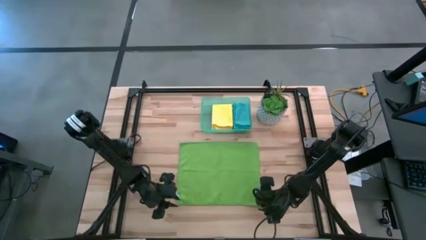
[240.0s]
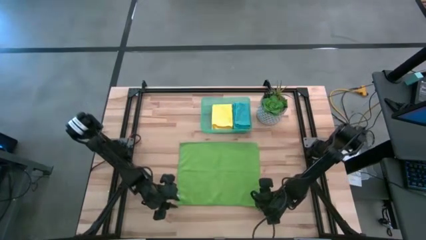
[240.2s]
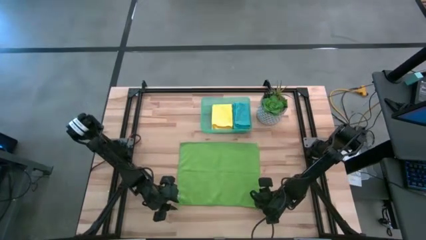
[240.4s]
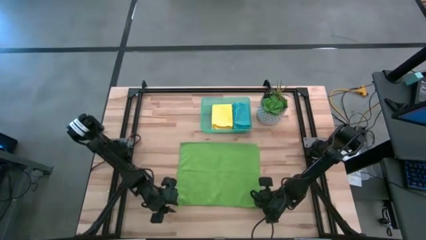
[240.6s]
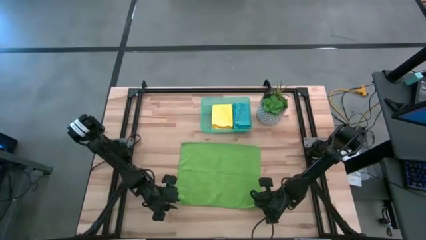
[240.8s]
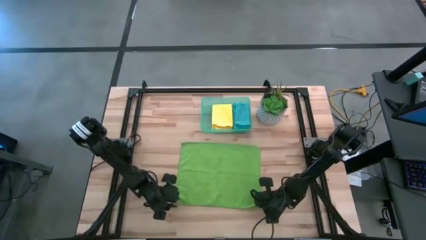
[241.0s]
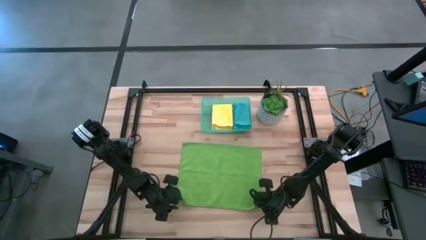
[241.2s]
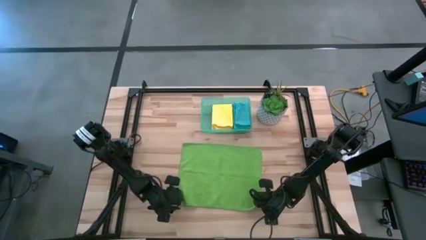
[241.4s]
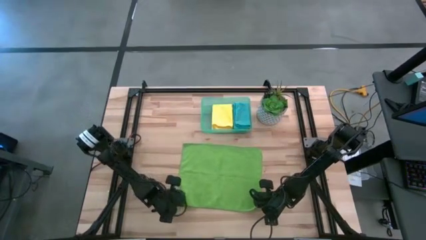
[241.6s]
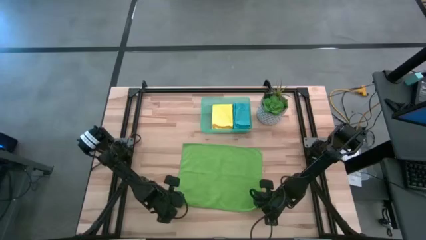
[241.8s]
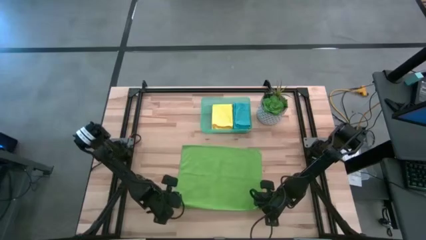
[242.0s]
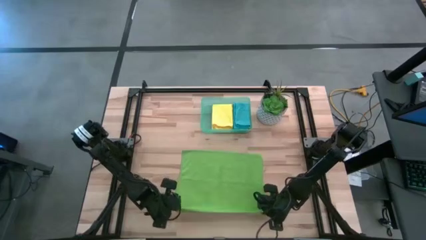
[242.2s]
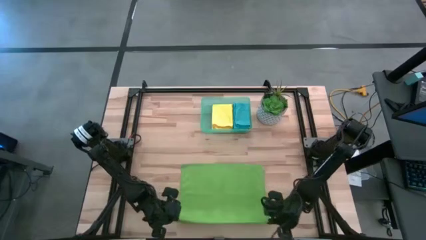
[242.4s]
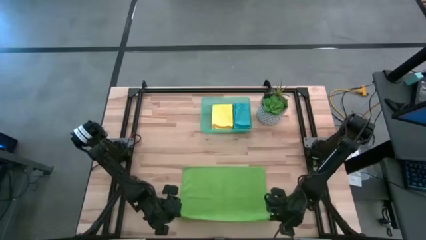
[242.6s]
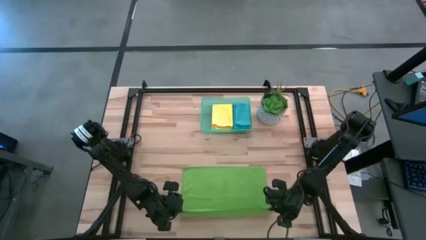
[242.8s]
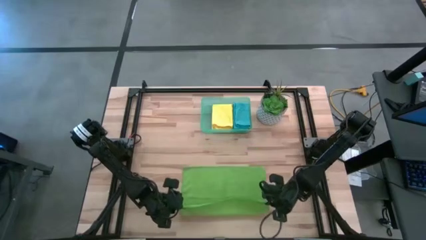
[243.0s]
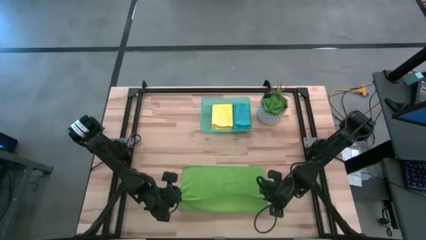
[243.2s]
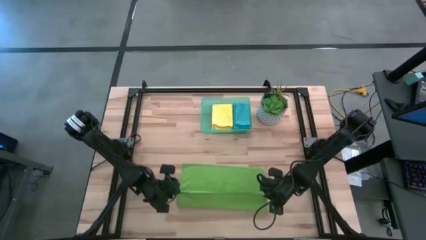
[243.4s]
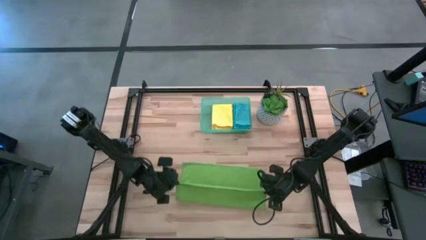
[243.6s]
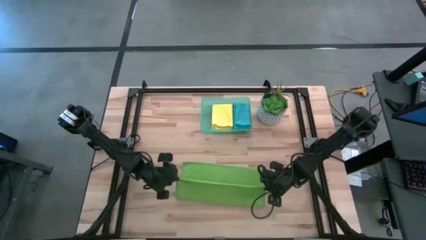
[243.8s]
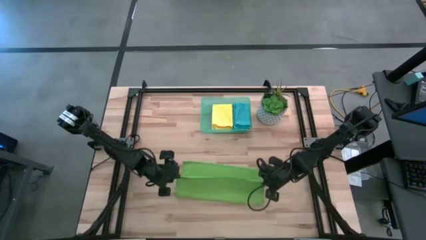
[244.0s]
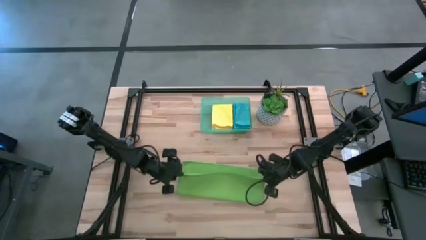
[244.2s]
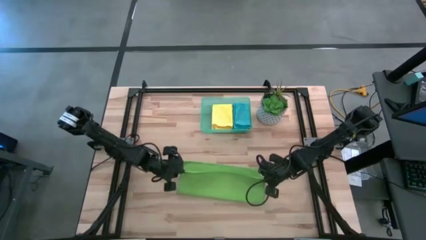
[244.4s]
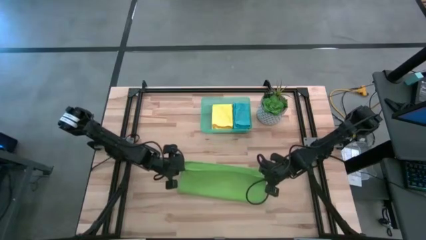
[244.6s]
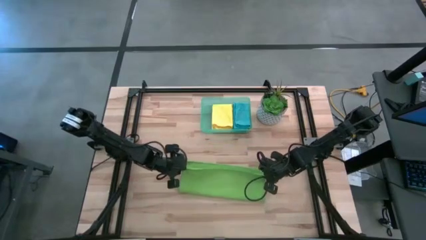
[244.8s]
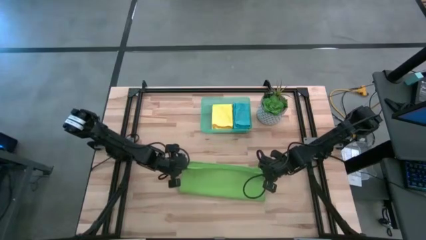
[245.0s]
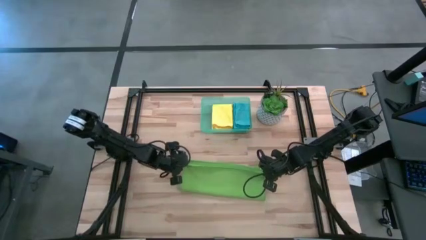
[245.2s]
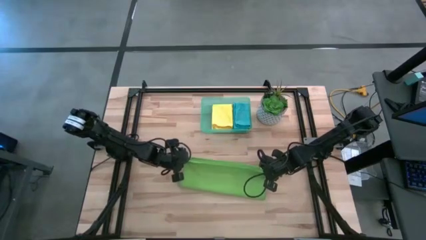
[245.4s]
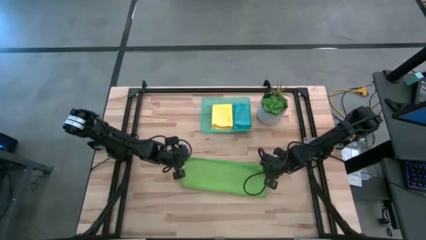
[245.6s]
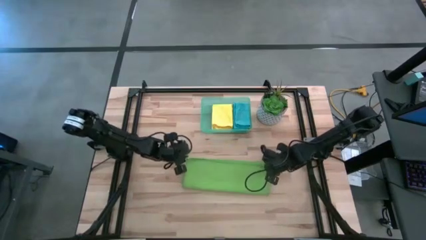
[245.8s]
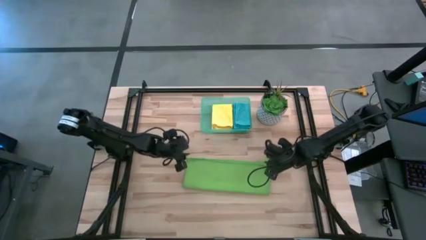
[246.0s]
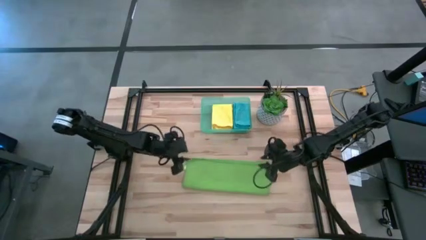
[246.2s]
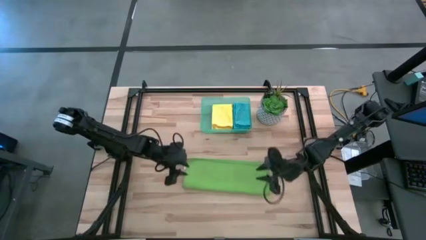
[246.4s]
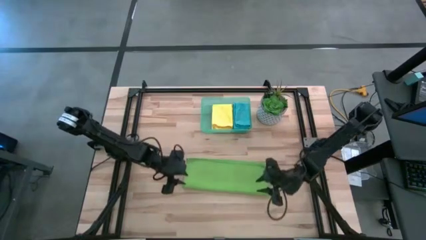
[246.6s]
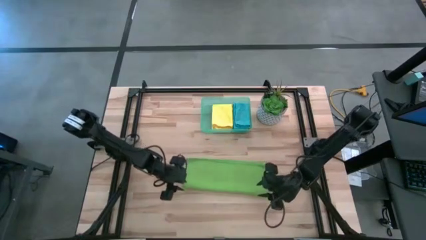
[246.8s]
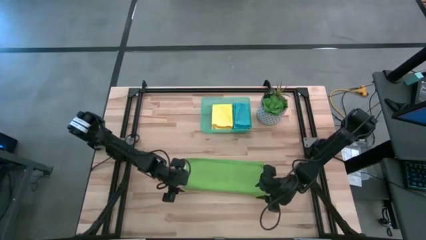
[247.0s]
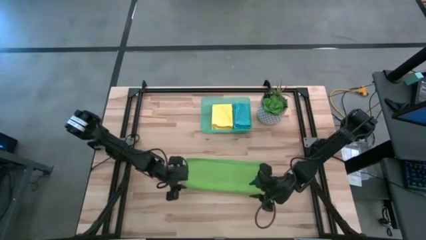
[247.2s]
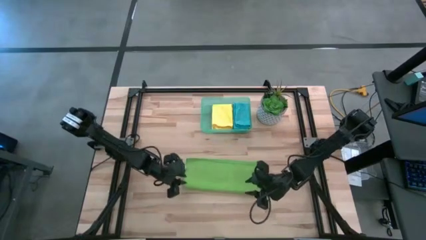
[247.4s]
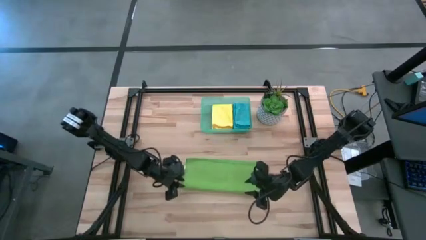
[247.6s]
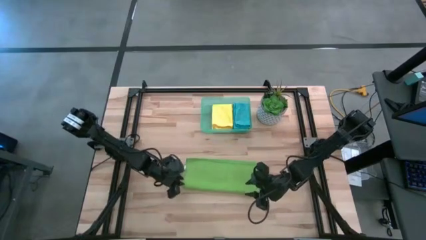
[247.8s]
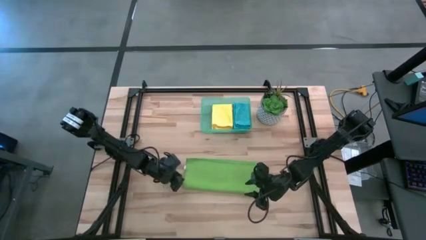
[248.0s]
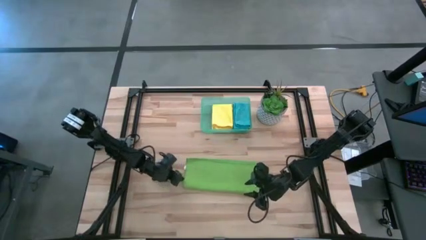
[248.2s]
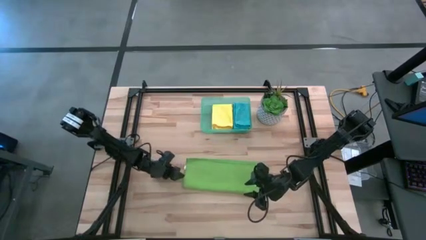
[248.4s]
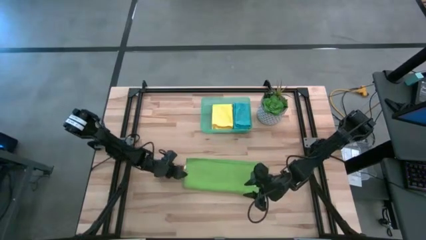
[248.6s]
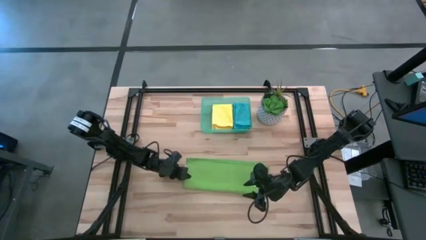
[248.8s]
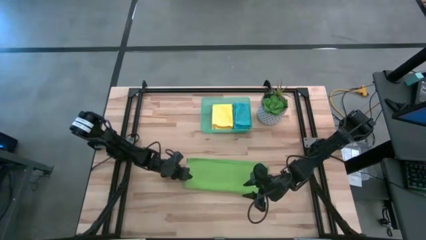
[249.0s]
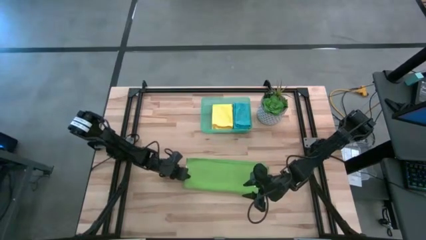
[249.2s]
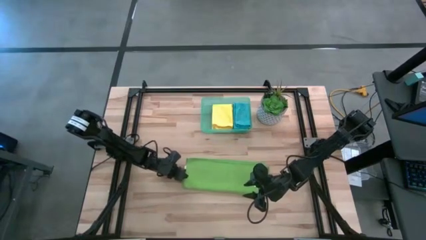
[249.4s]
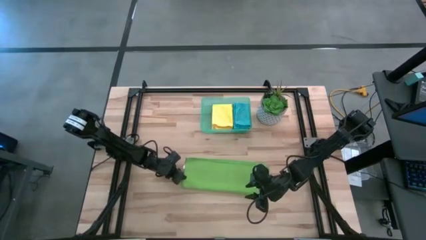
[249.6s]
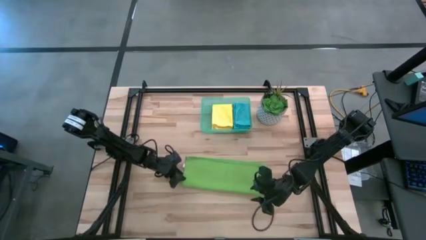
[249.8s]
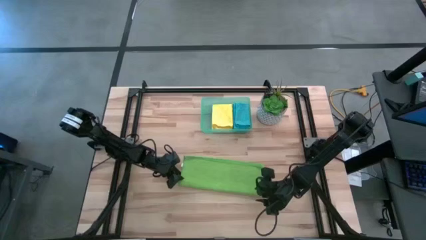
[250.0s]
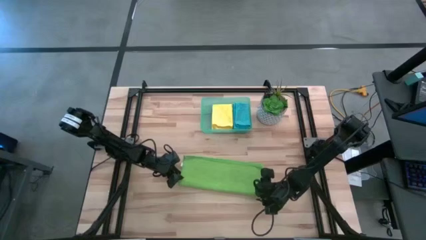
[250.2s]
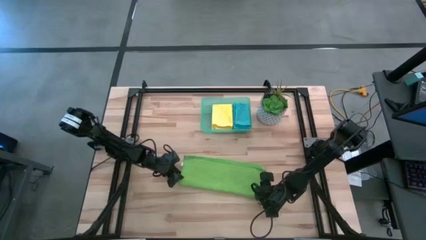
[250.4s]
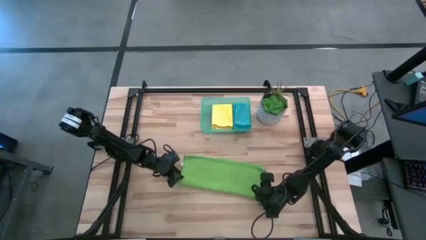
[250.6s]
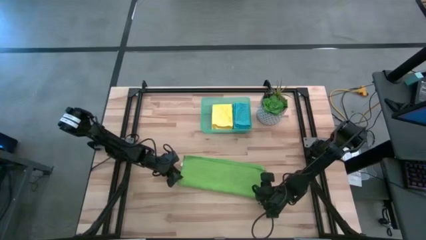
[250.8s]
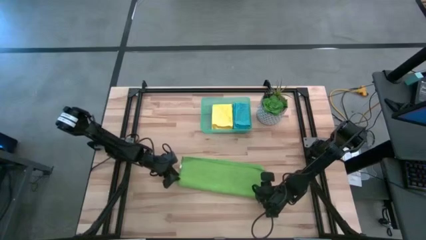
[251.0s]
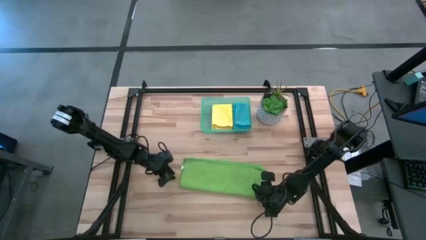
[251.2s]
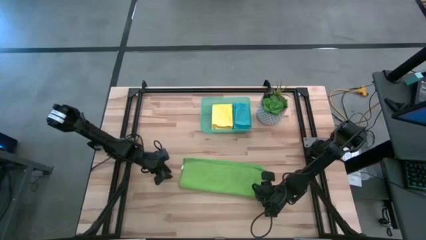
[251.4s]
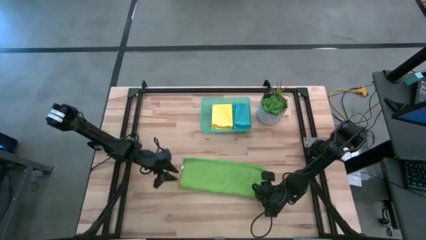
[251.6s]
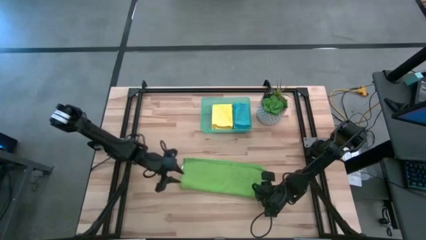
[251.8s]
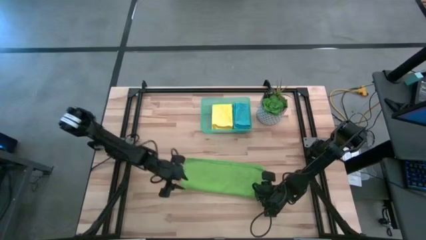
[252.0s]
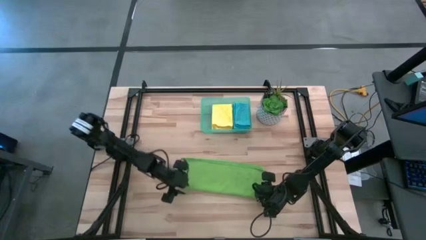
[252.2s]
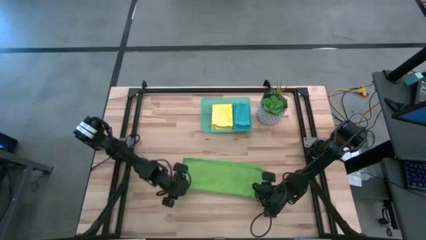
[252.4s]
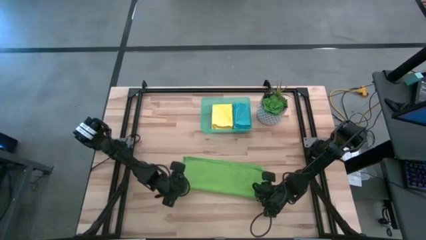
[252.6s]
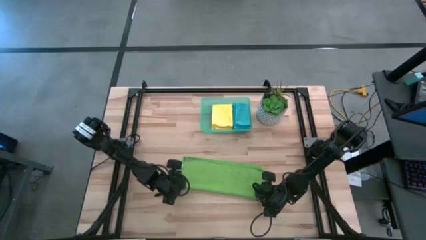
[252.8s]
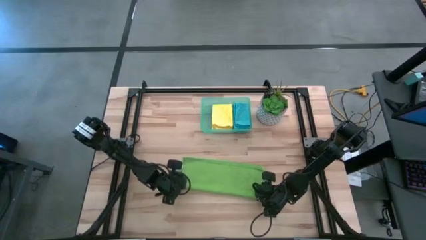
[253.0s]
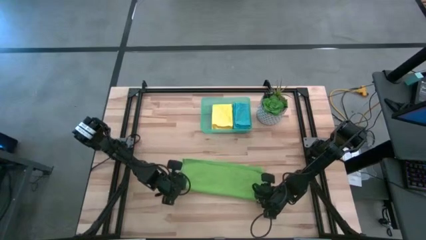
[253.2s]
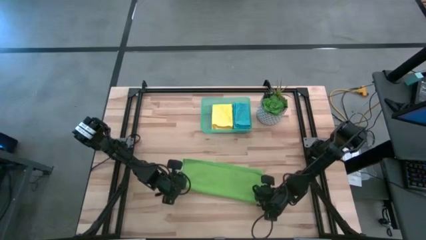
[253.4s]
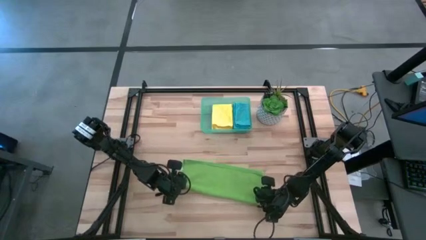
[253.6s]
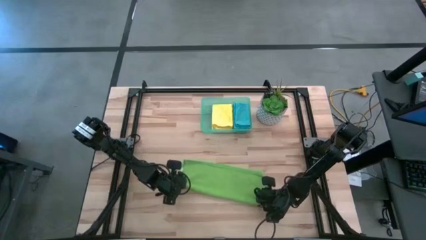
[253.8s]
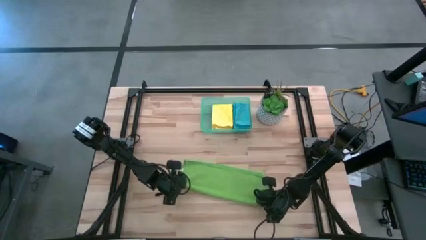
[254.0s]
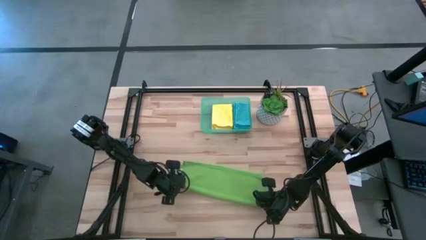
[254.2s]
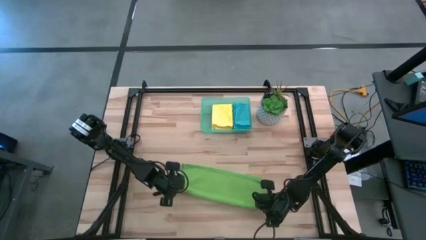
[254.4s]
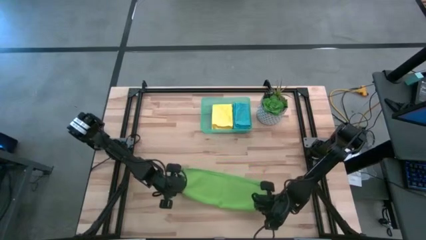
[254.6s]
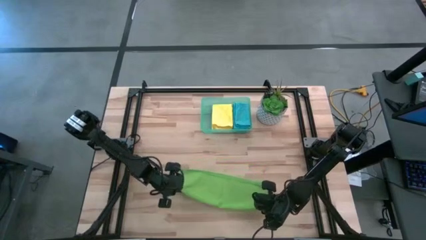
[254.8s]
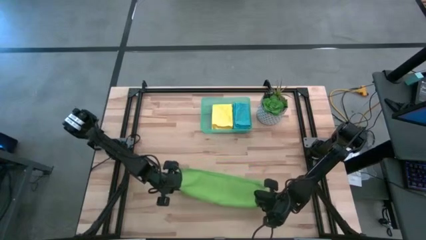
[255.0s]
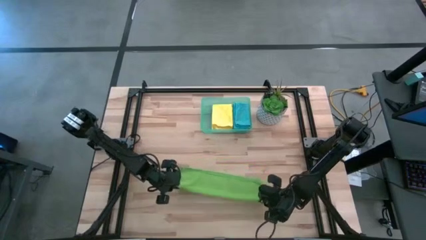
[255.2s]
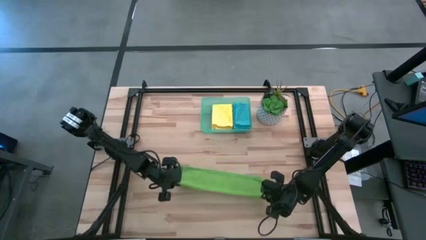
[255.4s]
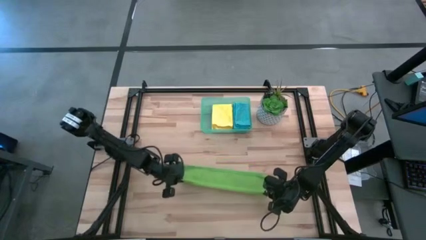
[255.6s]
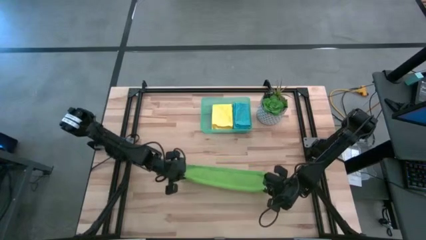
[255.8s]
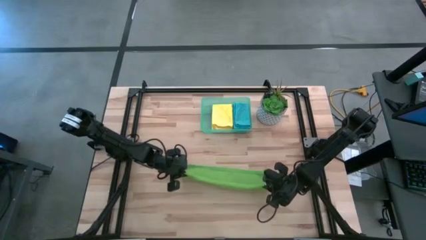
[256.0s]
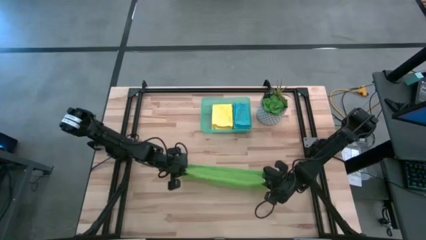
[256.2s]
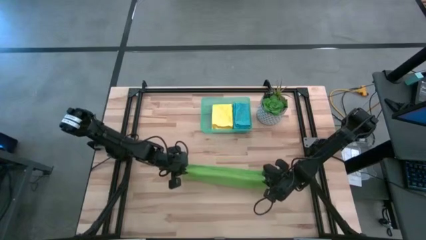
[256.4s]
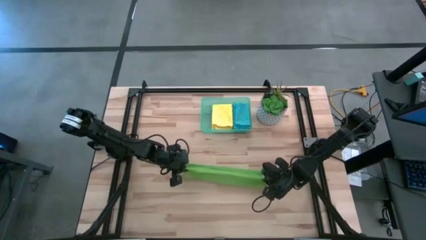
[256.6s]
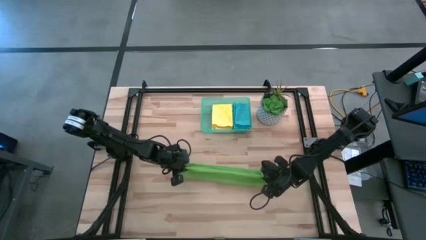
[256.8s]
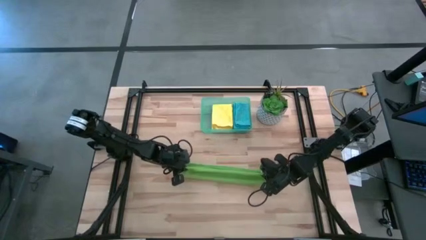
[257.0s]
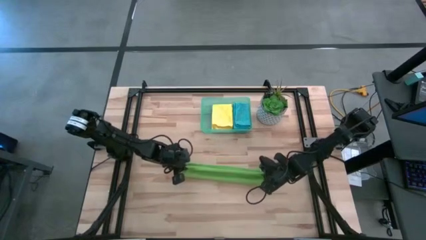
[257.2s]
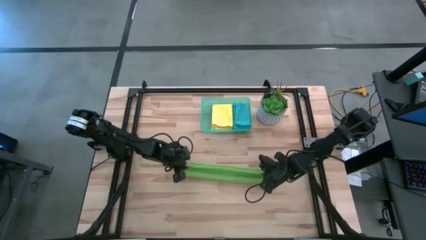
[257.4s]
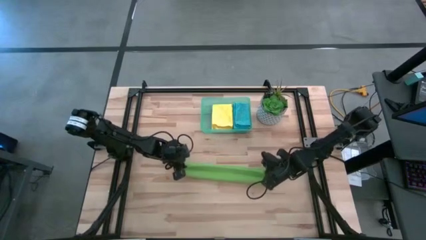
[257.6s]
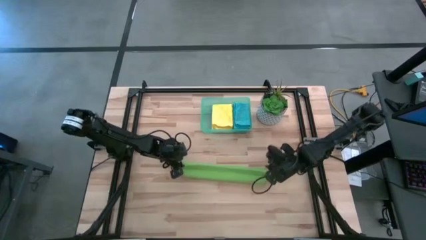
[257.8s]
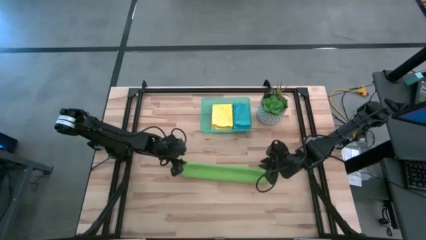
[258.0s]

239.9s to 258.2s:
Task: Fold microfiber towels
Fold the green microfiber cloth
